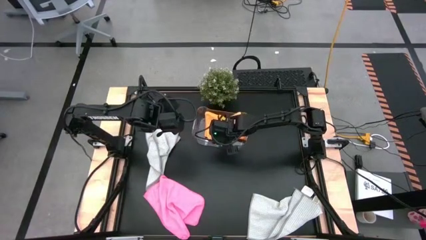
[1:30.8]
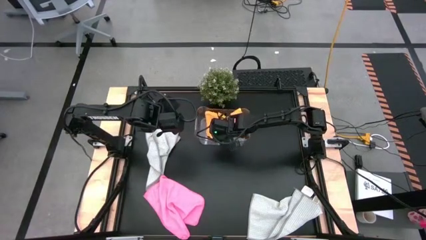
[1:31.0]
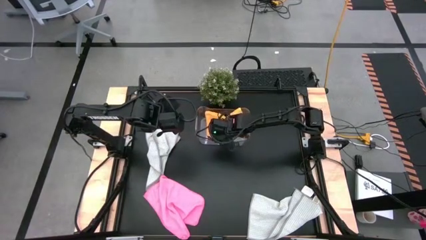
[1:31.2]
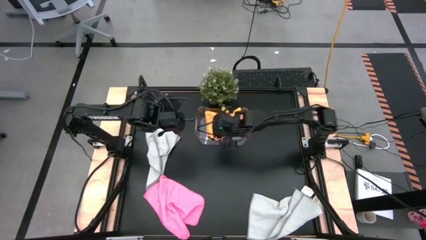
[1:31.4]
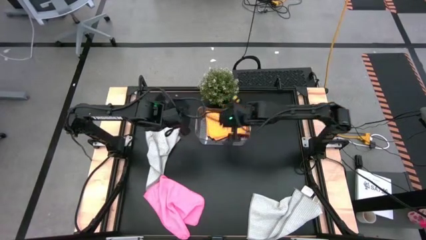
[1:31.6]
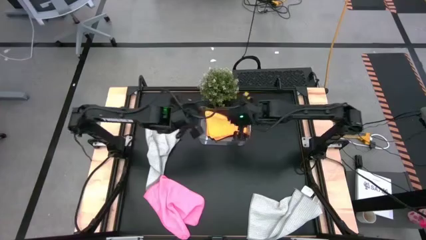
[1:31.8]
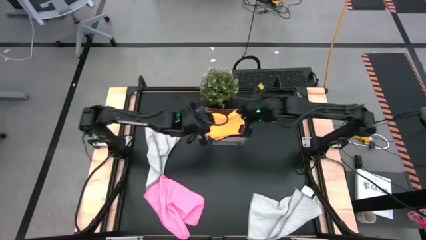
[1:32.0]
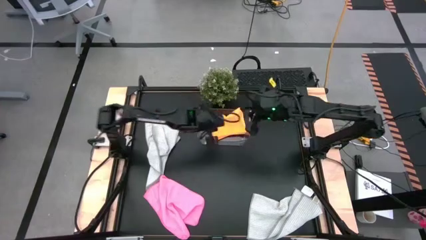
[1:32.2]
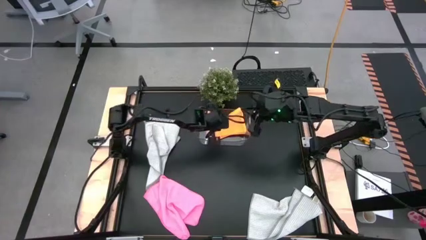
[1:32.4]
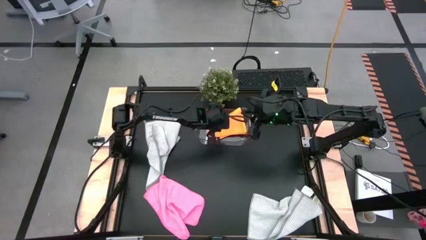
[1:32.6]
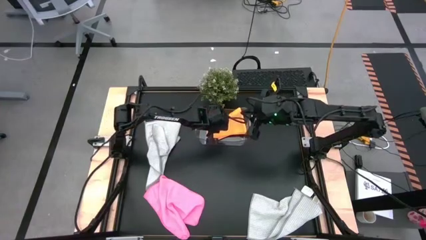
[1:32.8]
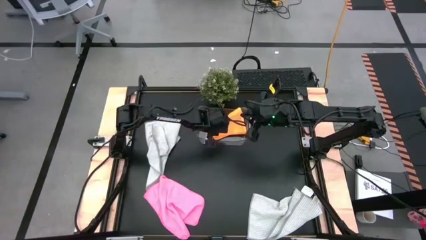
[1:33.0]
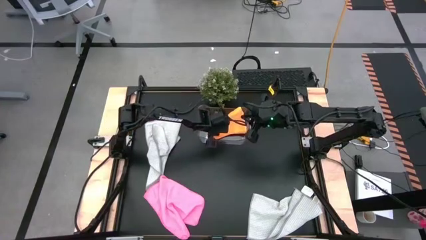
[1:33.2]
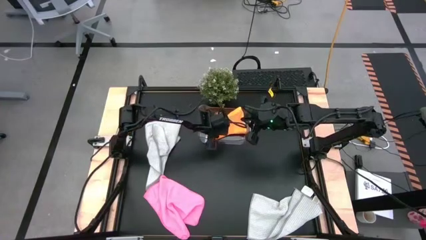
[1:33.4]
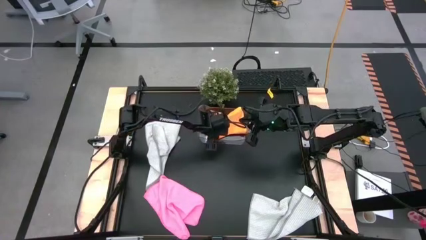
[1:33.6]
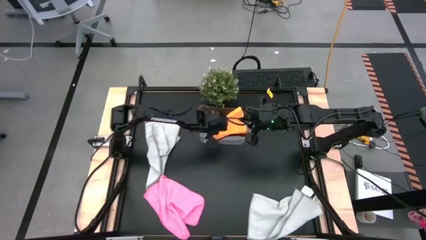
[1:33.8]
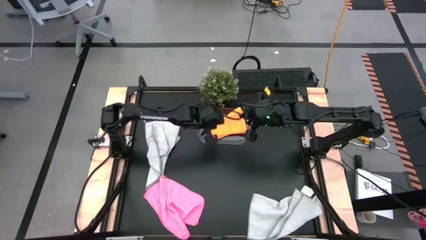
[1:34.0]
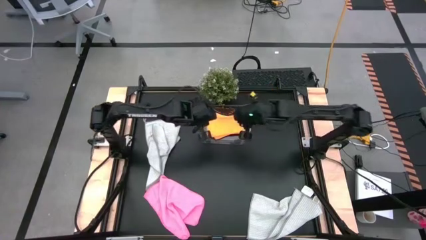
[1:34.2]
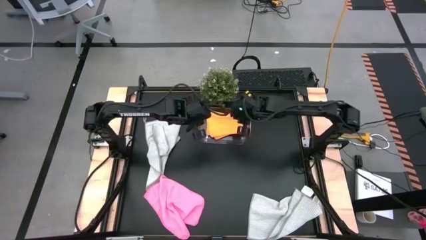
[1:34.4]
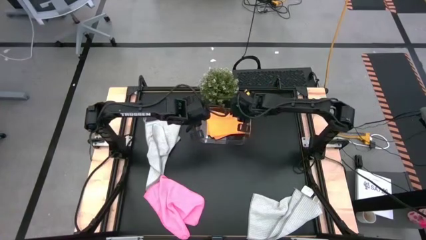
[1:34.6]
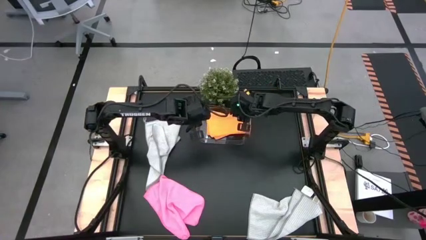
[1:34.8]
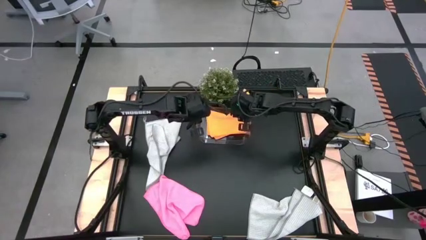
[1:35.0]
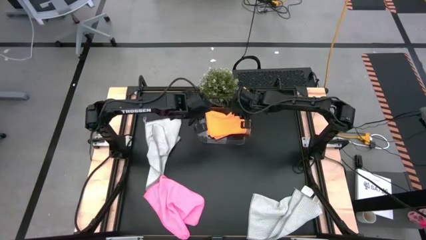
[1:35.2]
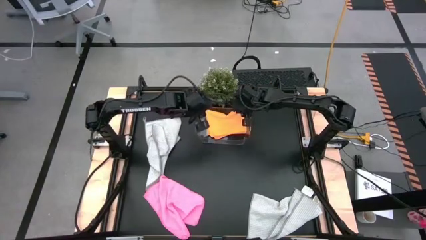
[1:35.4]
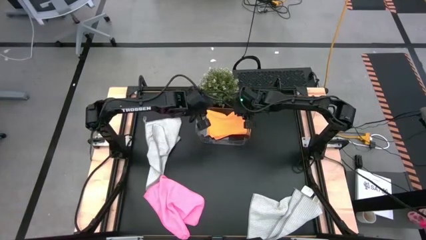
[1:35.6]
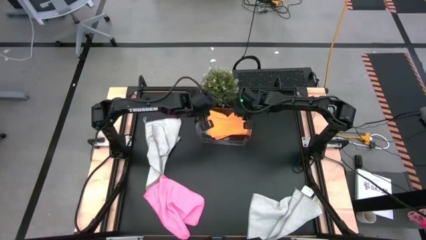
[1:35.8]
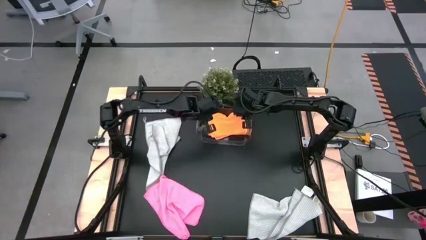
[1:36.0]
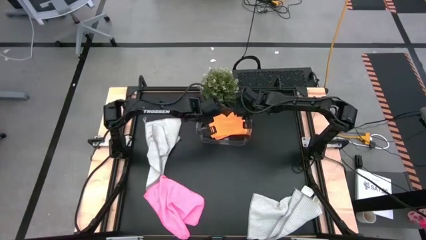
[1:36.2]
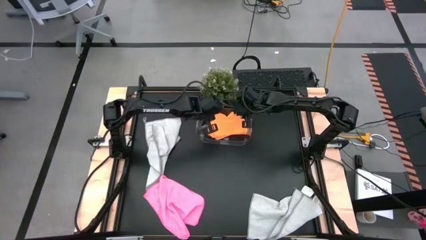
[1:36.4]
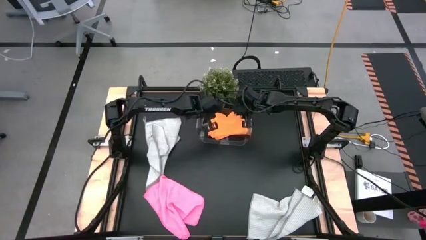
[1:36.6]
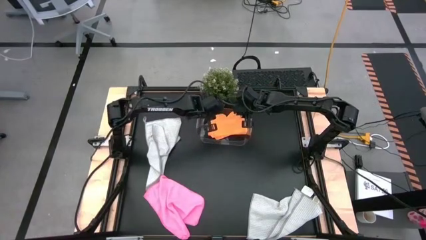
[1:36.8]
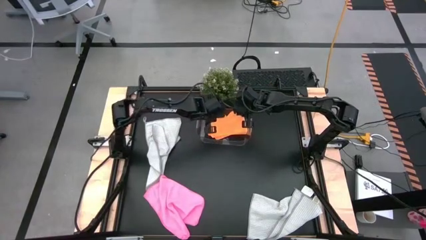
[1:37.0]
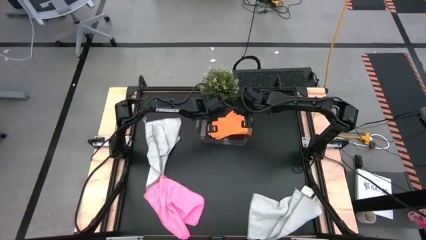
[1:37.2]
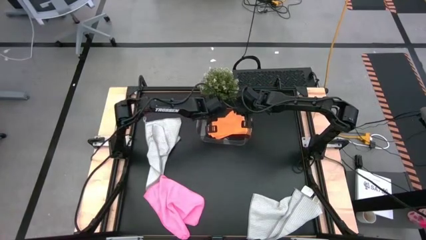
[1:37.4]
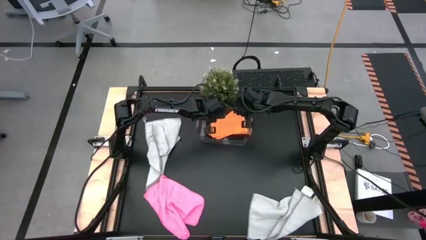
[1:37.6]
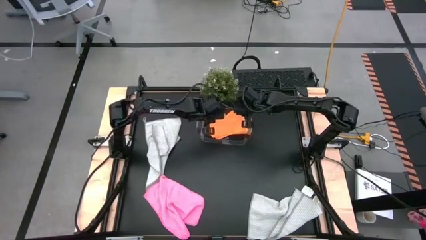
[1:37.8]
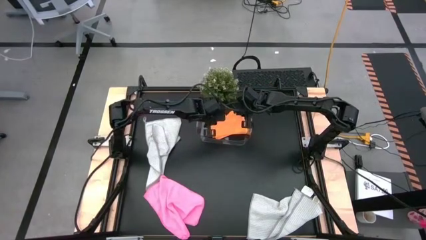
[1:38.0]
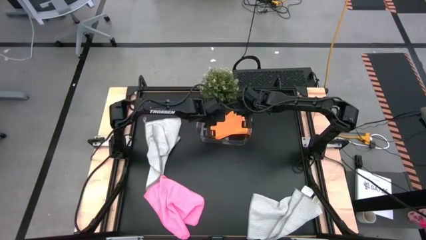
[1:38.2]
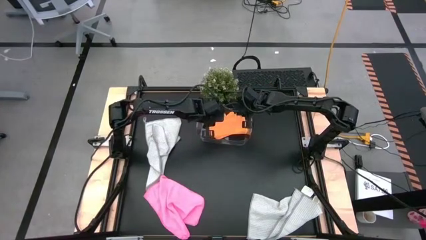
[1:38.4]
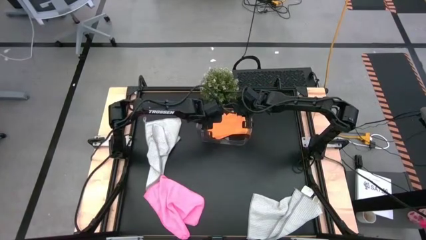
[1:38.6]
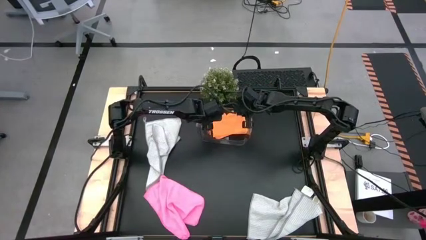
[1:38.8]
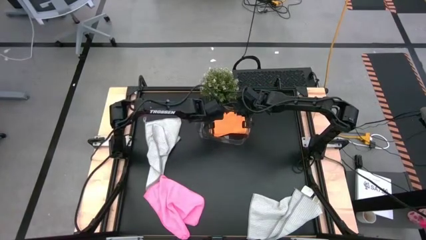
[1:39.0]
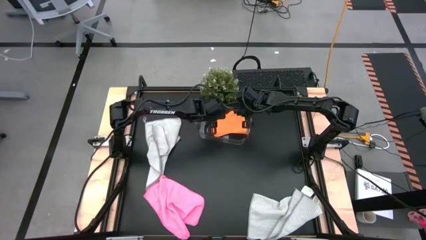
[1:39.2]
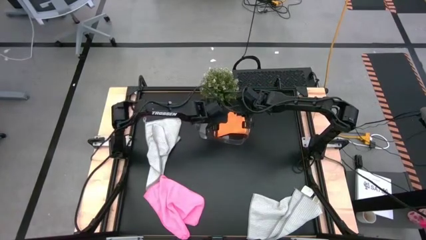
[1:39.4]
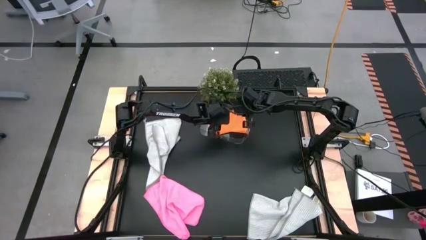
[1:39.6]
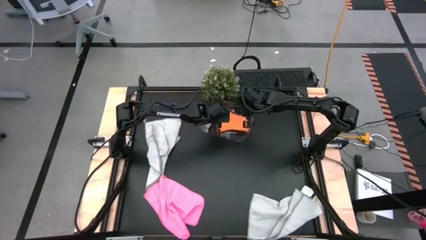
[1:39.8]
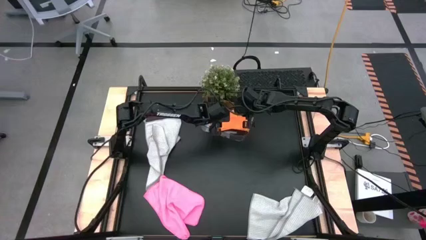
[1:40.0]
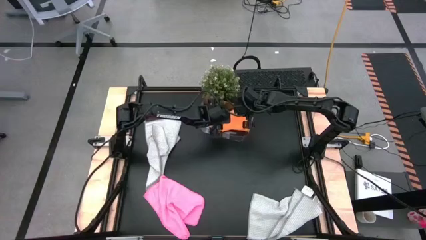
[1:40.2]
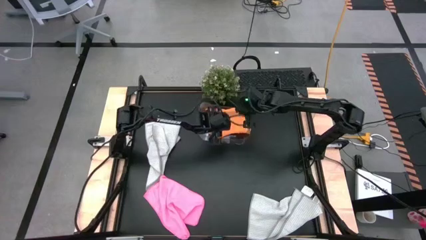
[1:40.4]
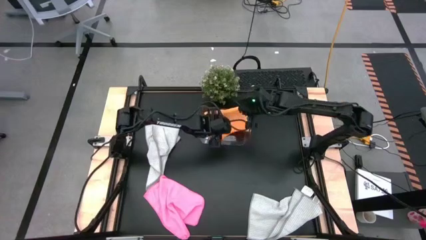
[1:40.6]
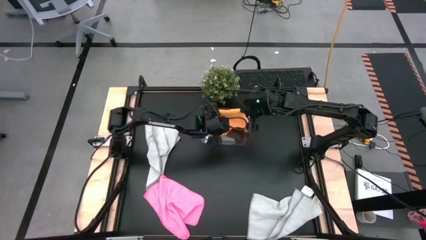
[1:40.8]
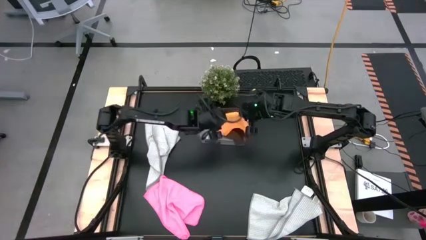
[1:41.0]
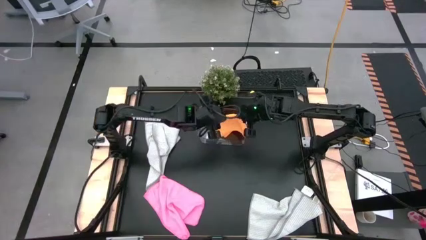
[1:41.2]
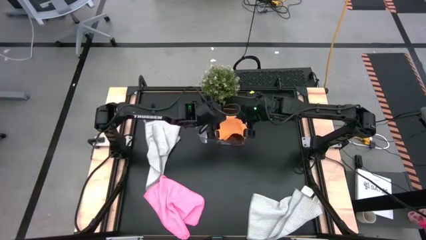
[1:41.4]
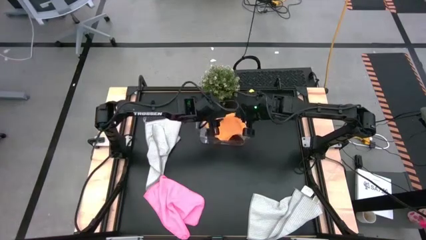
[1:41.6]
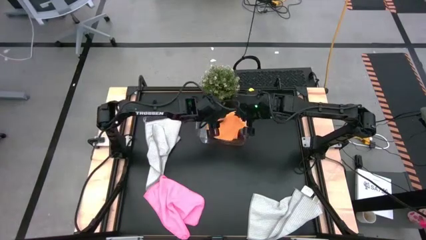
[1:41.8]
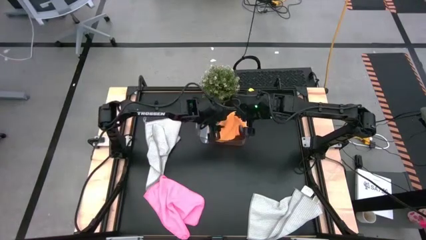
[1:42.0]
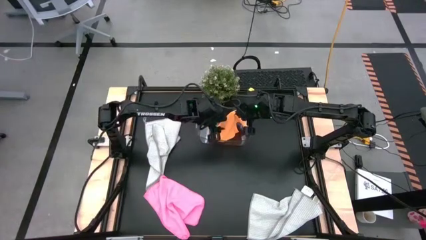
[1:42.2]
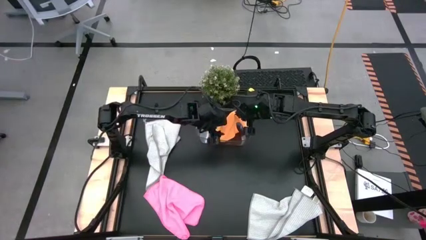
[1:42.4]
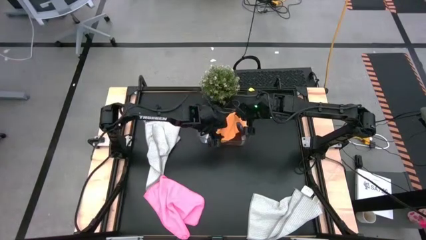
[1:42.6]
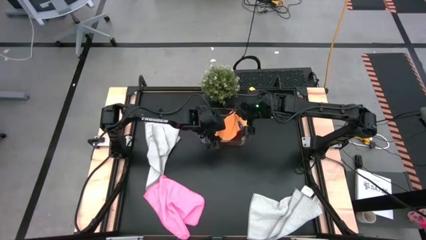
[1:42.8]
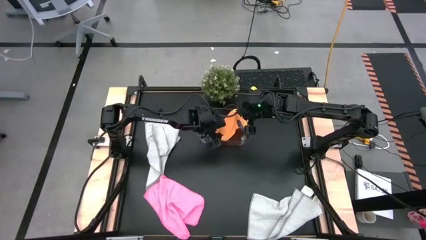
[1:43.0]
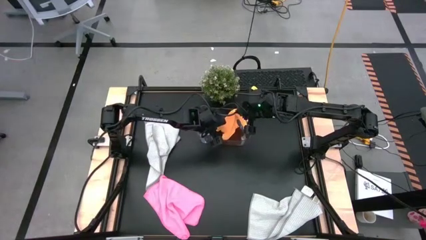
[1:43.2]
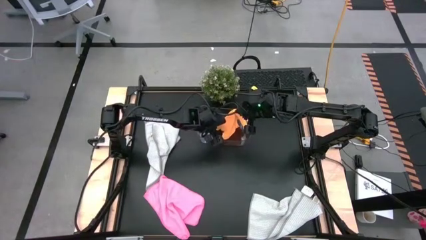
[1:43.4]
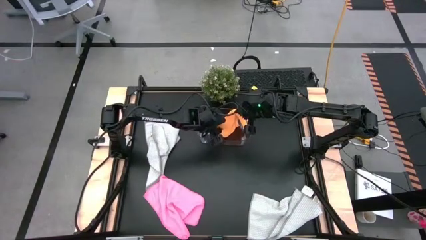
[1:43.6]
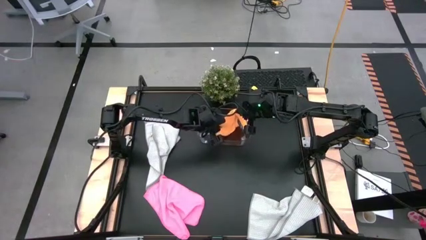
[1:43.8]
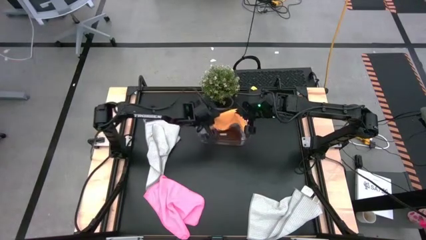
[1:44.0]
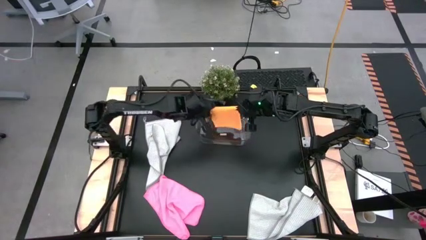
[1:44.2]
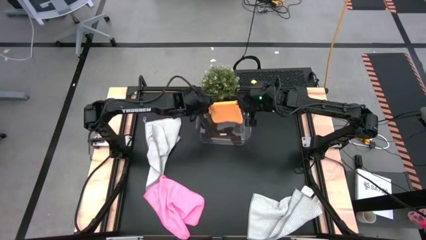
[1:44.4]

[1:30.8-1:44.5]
Task: Fold microfiber towels
Put the orange microfiber towel into the transparent bin

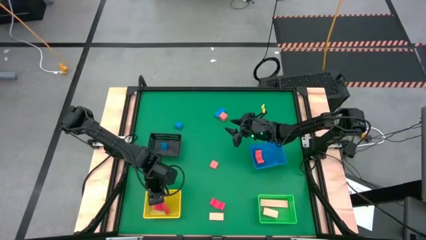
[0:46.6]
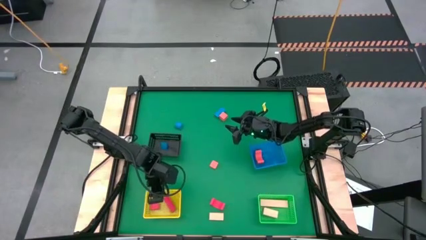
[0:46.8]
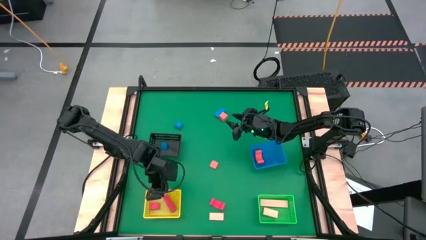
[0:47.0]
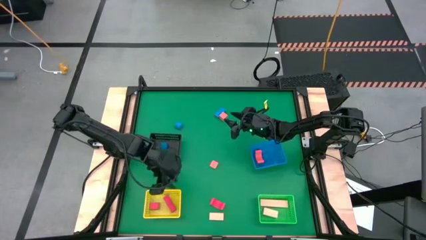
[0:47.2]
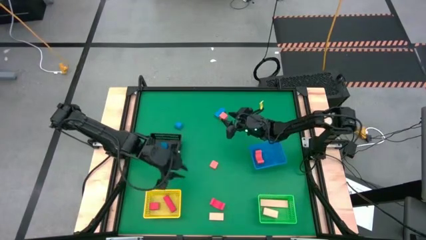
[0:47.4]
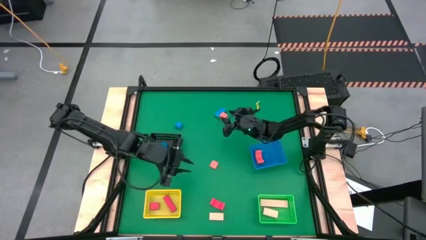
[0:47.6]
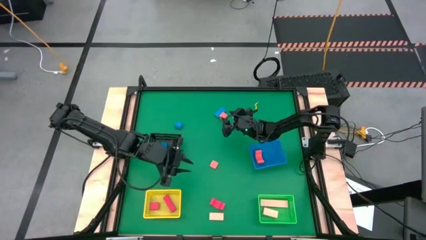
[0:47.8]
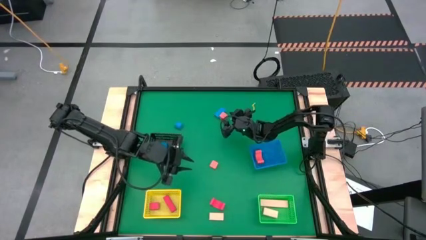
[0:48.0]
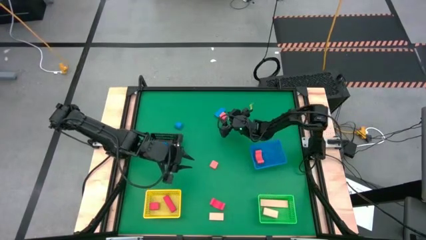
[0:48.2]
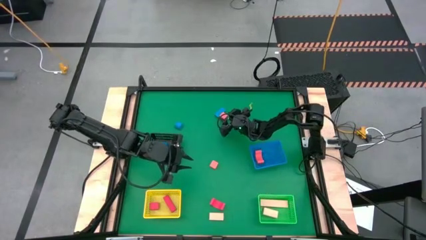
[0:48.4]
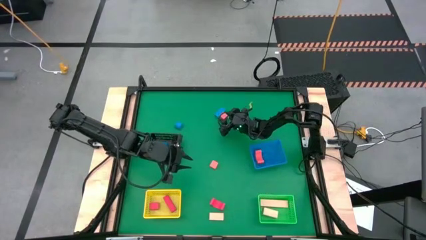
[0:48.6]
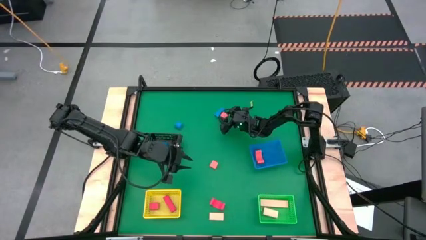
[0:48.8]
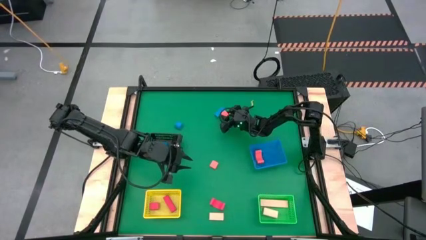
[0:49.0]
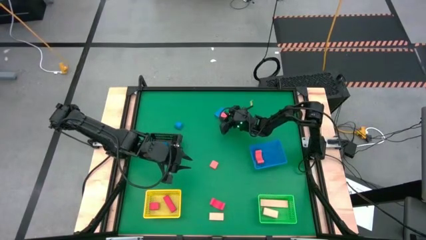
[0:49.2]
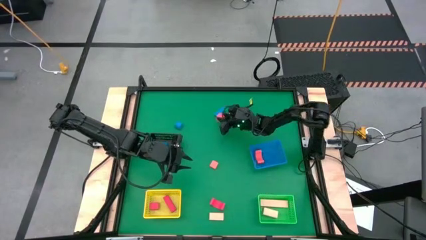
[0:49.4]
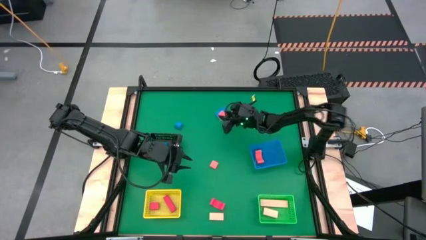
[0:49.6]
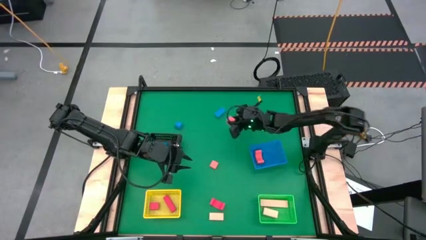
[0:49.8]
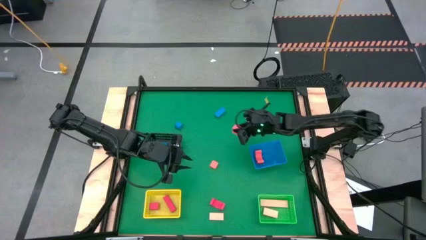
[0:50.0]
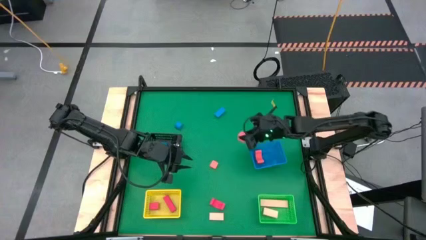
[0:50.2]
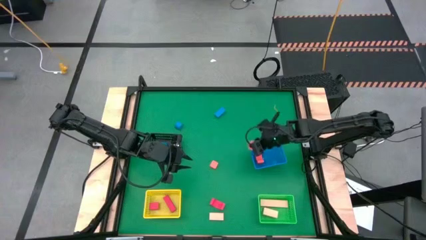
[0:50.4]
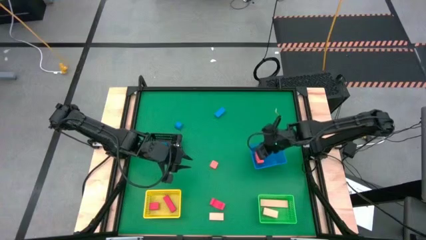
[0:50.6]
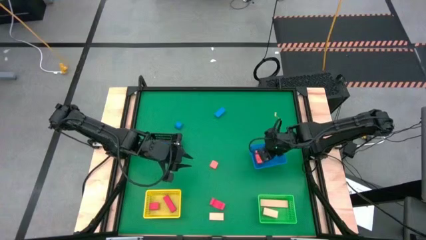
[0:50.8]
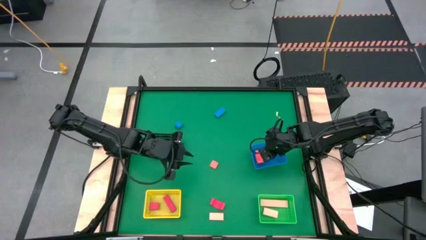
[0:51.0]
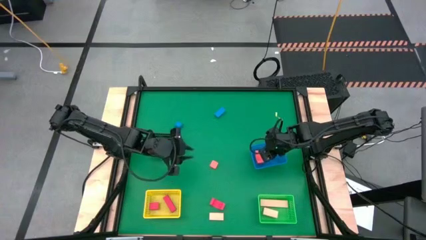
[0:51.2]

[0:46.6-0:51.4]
Task: Sort & place blocks by color
Put the top orange block into the blue bin
